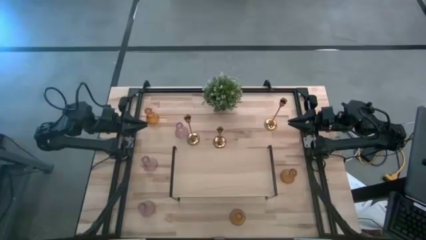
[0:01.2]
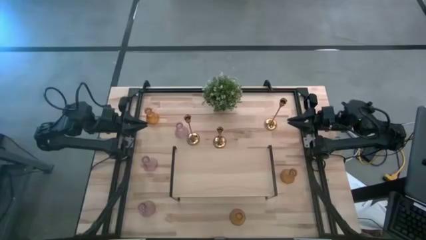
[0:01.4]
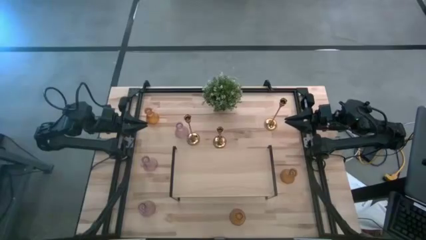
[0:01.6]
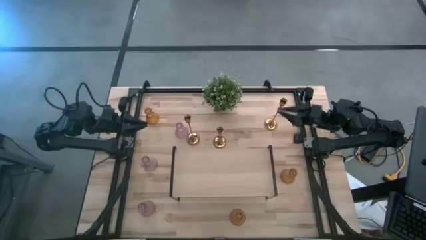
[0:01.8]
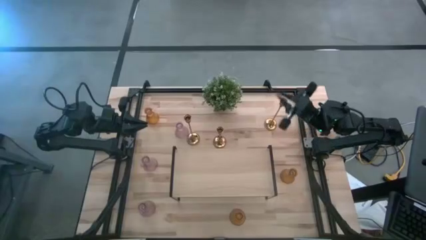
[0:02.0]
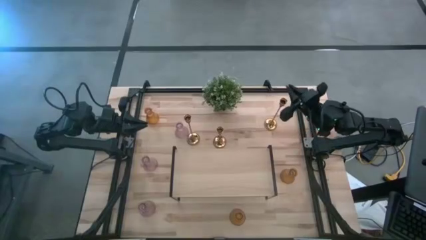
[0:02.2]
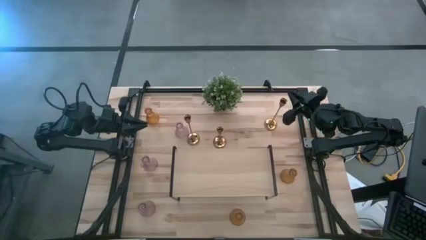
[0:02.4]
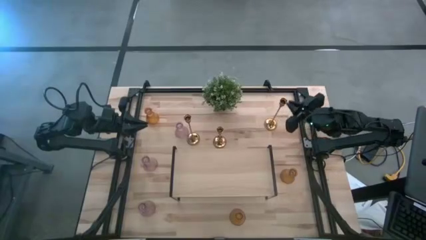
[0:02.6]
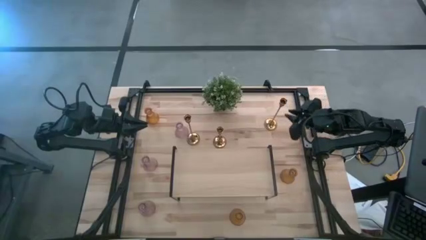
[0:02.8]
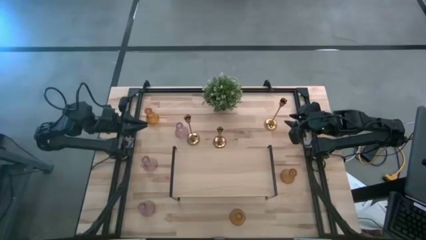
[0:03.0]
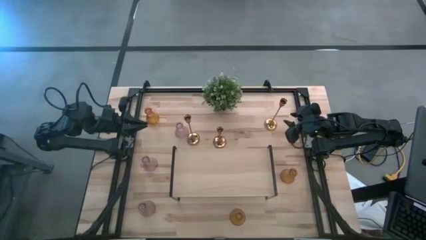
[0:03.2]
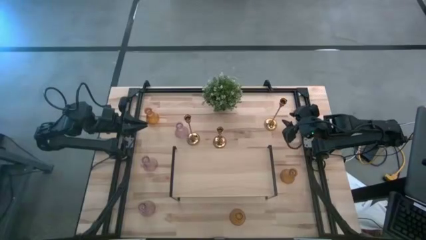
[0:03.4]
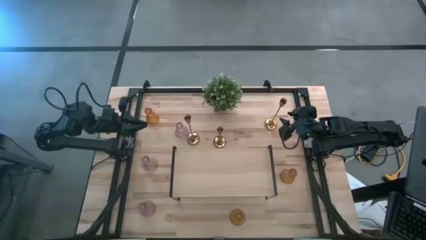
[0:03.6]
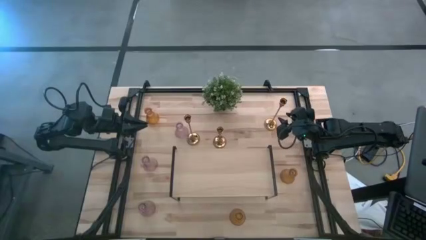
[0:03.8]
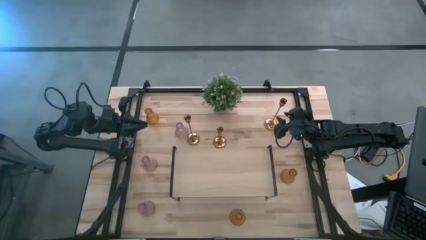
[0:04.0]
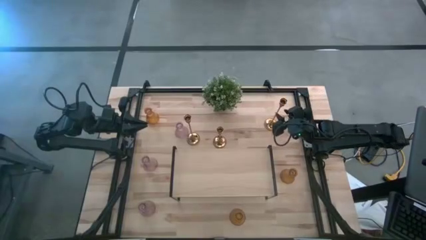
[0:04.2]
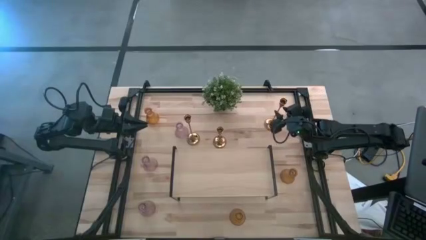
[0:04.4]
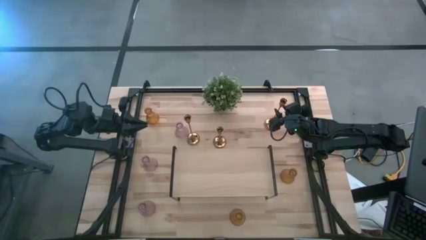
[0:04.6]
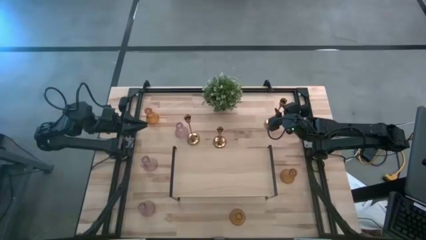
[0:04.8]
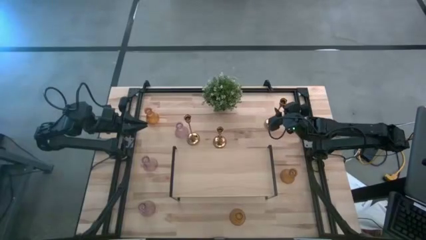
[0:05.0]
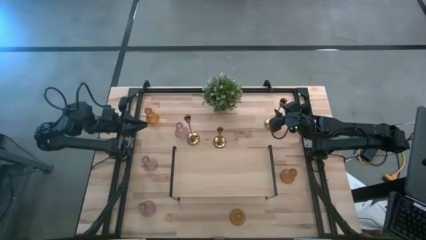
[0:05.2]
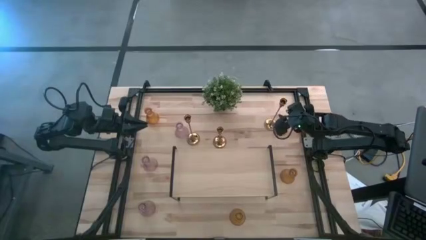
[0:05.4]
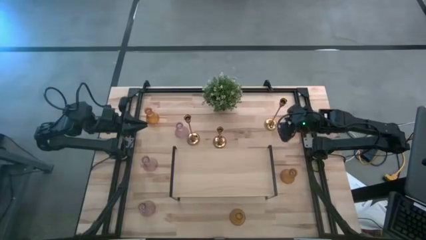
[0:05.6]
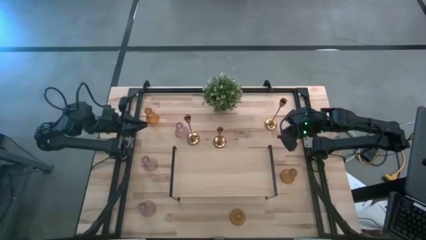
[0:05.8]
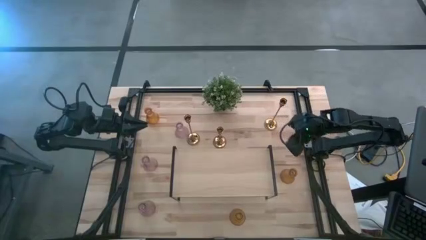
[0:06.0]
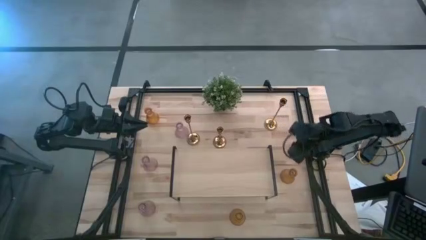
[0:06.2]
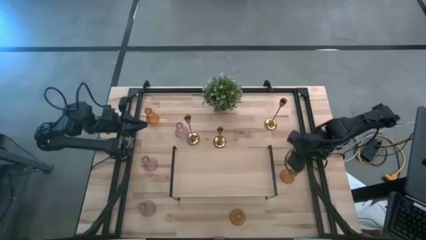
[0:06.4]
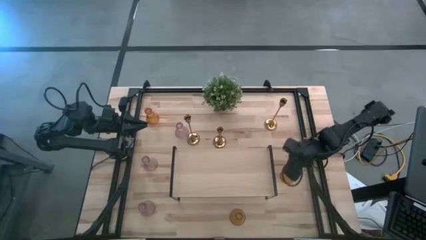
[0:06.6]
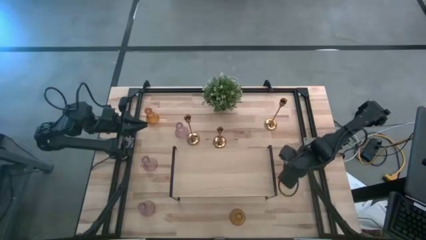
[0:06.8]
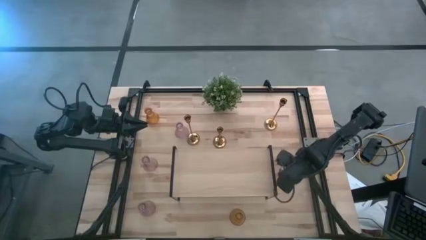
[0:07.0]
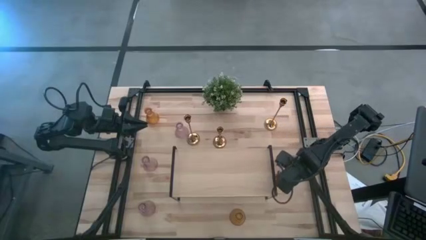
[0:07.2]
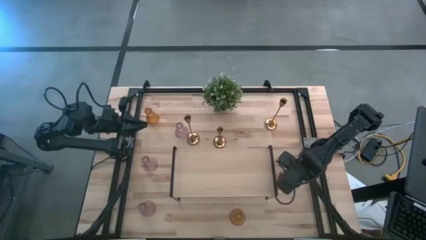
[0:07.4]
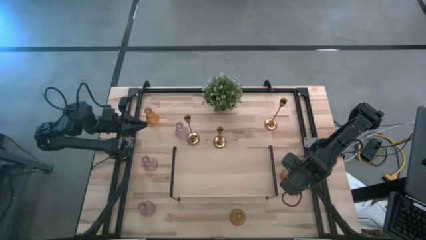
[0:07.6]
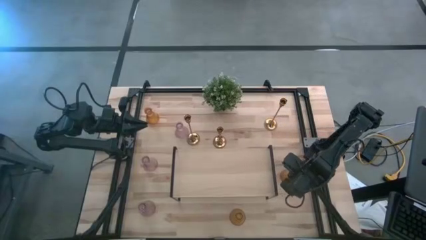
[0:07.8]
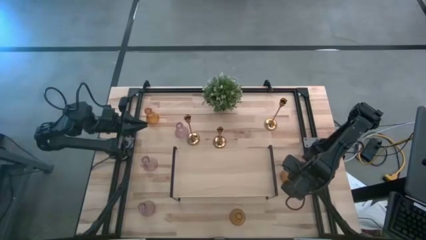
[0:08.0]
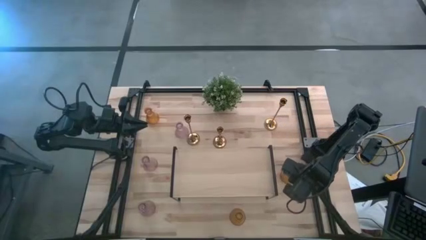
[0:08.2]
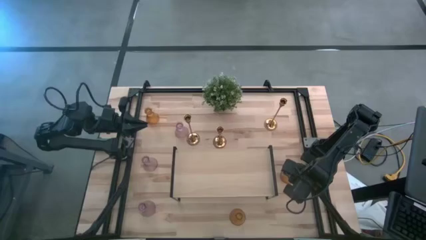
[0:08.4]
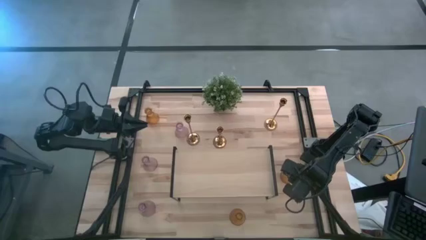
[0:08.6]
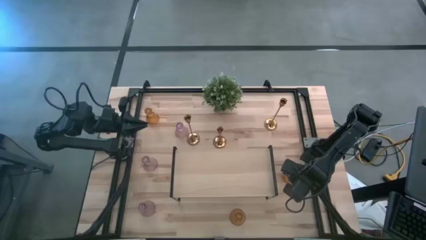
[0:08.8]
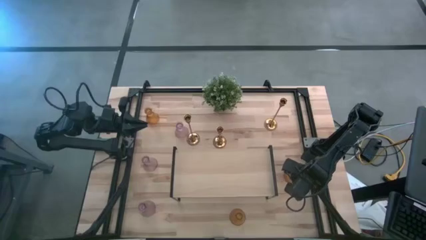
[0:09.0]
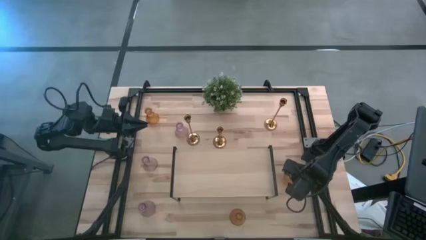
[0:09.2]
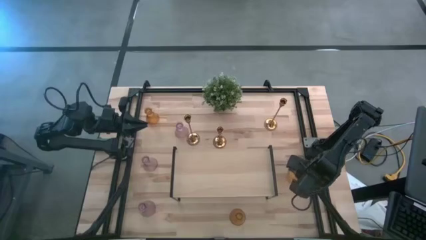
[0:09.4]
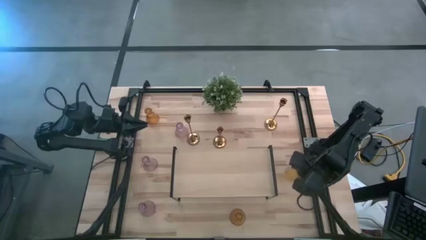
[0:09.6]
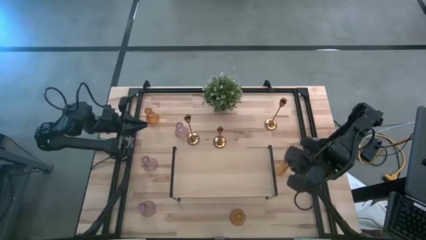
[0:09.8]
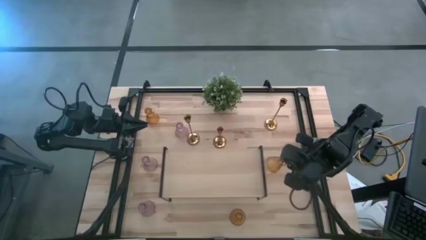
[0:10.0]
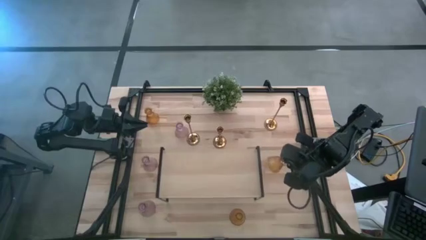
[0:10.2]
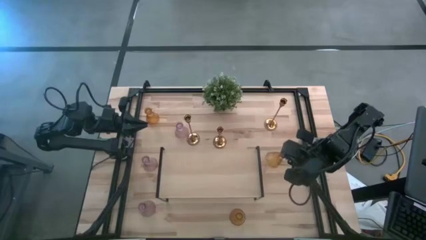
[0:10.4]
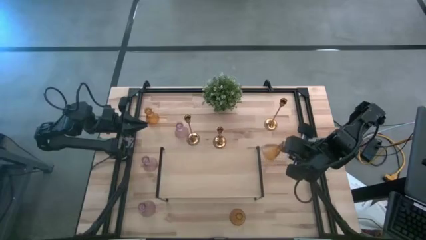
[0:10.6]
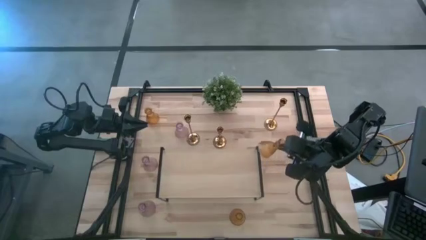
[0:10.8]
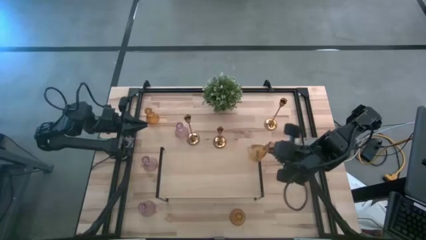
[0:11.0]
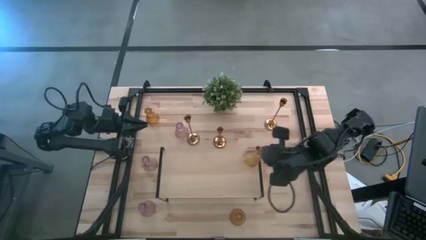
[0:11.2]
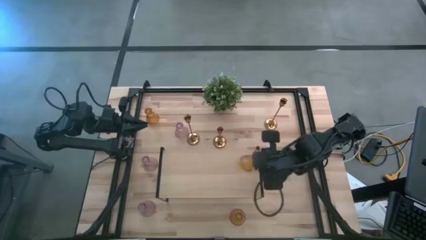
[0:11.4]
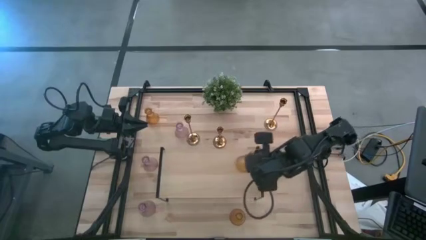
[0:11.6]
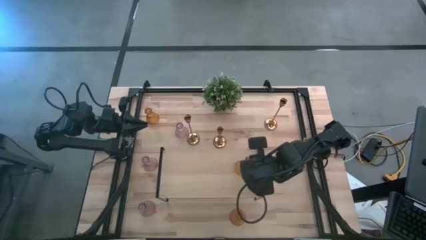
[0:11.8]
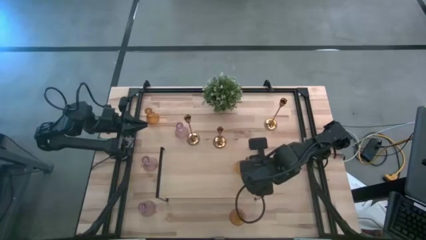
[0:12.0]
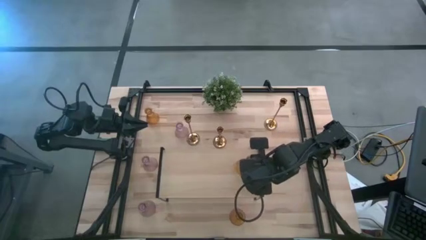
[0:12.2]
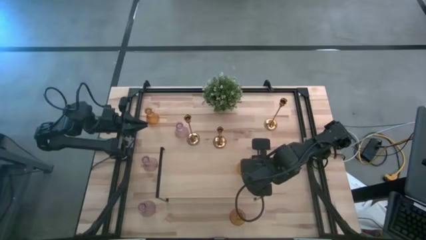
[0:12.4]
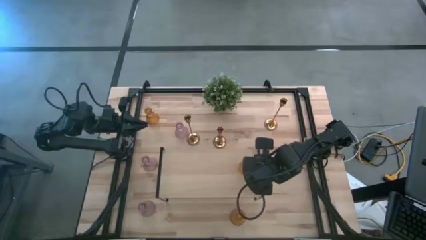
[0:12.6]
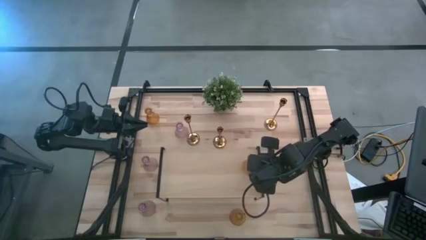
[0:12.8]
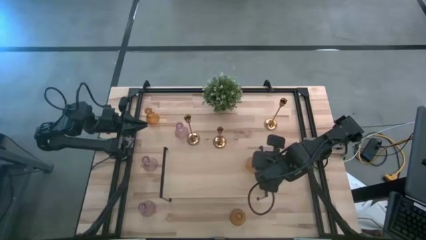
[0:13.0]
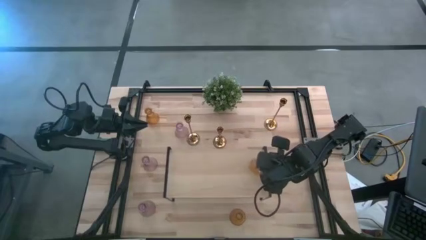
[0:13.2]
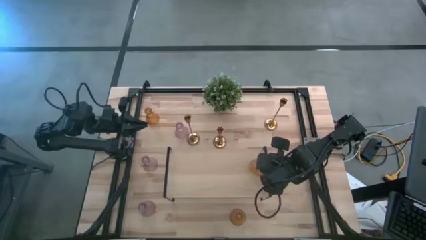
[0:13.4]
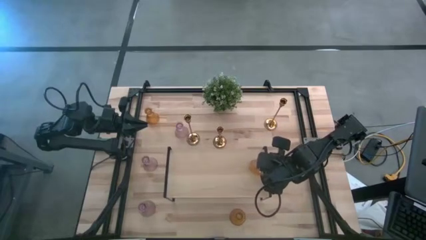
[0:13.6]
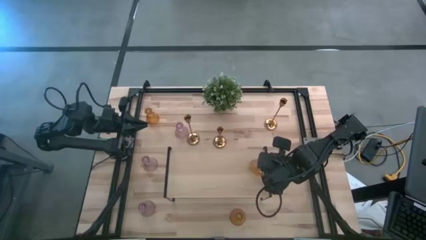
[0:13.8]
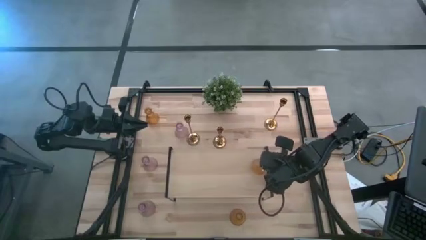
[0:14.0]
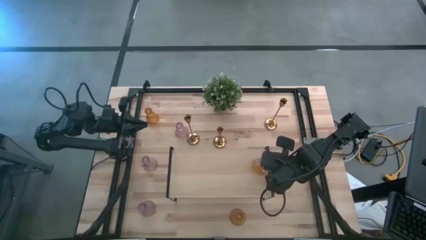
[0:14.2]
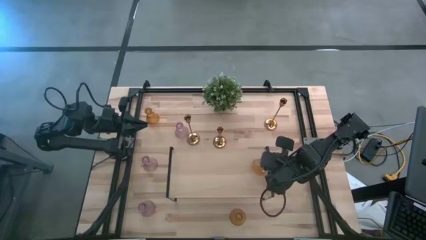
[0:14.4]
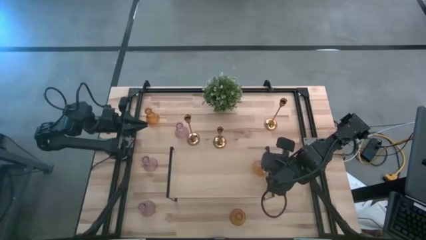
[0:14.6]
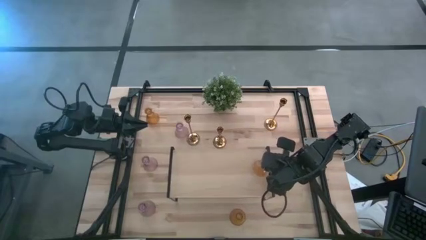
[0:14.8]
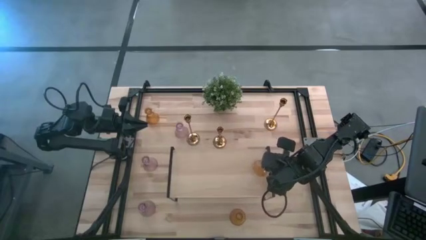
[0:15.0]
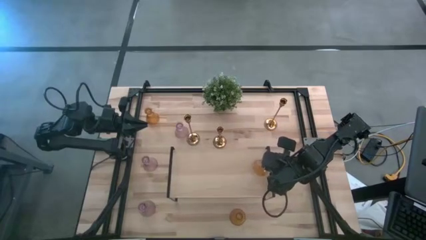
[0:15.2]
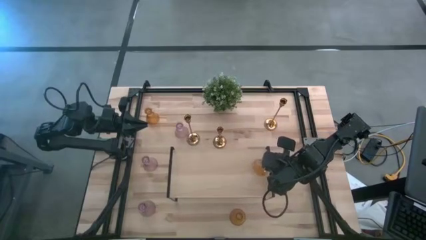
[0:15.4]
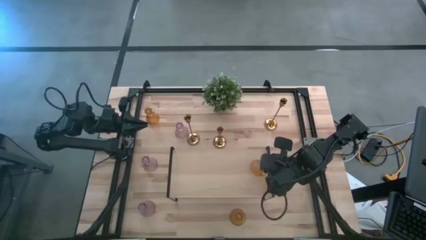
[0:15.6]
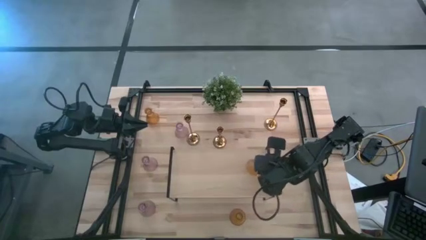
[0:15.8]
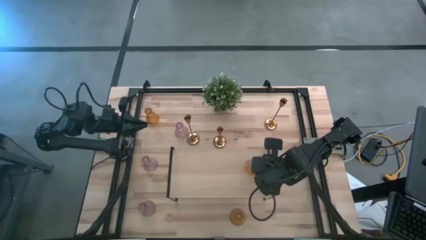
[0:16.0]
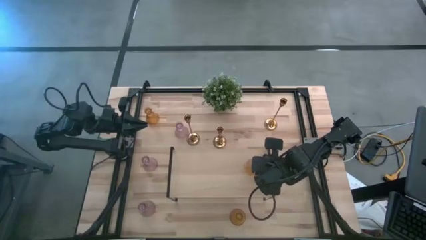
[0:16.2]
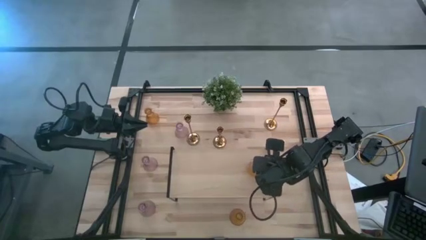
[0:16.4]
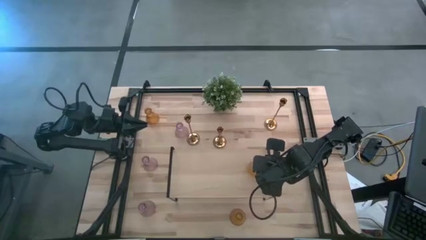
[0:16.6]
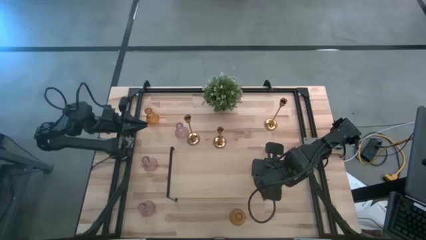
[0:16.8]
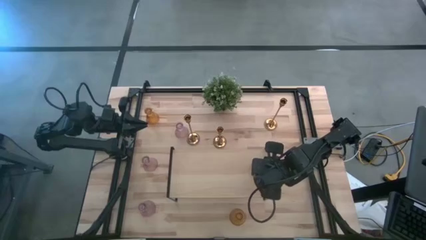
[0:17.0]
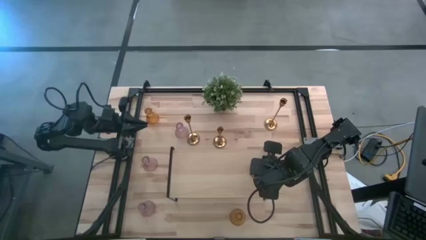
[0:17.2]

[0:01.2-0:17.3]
Task: Pick & Place candle stick holders
Put the middle yellow candle holder on the shelf
